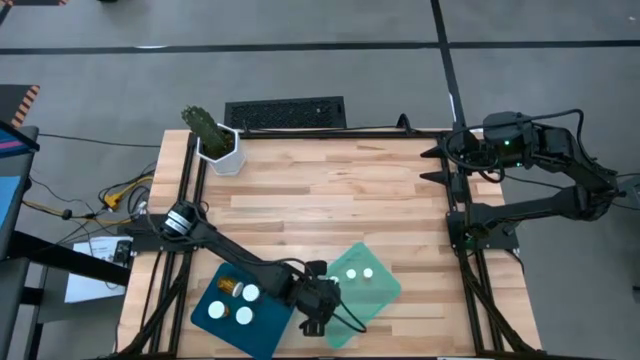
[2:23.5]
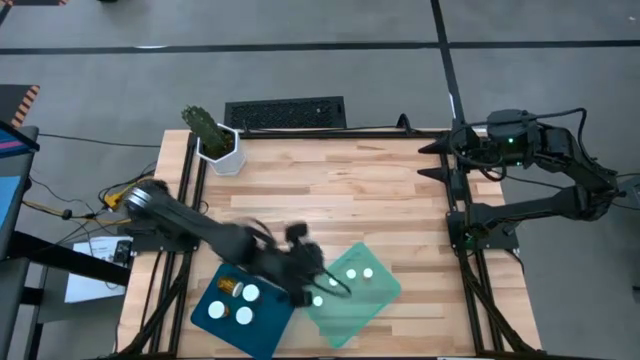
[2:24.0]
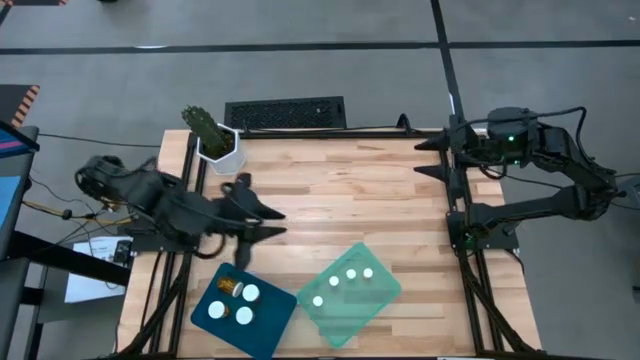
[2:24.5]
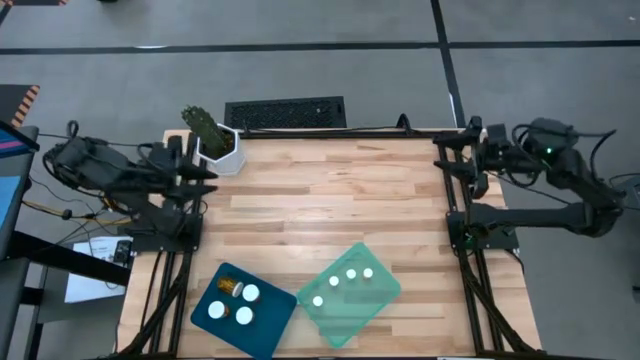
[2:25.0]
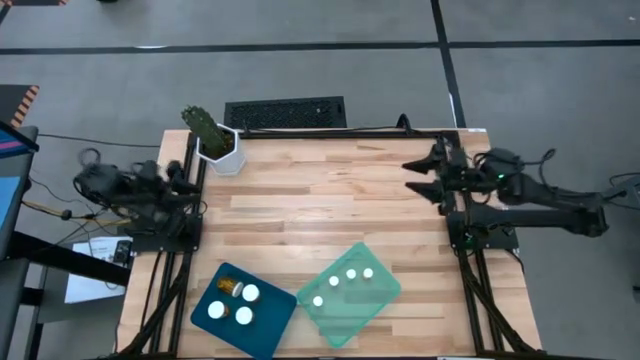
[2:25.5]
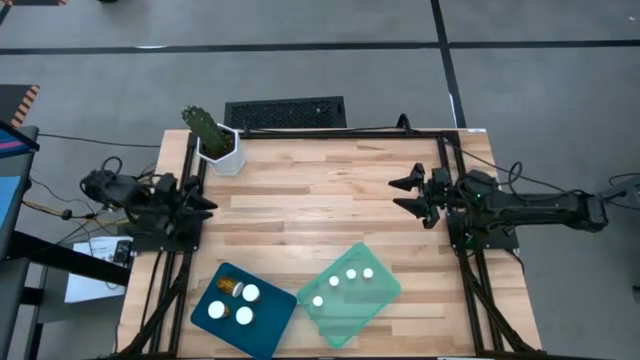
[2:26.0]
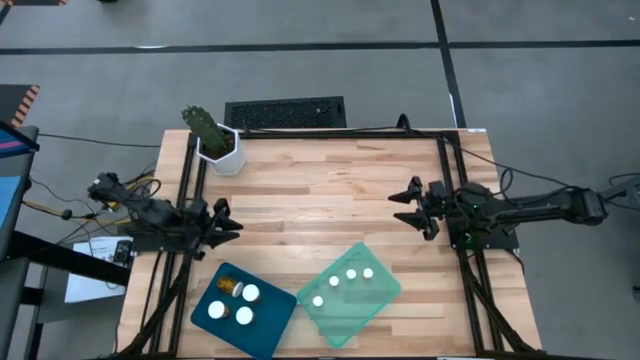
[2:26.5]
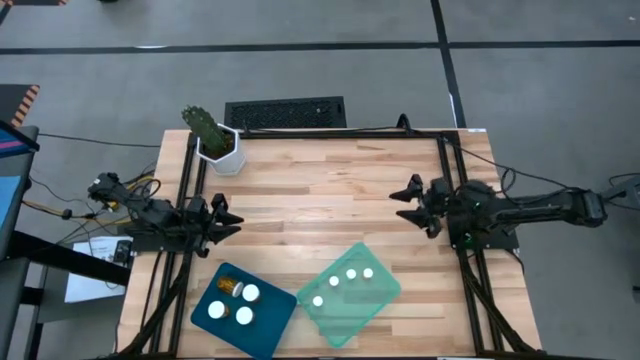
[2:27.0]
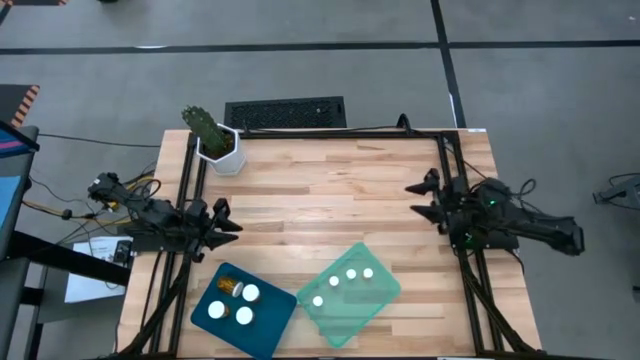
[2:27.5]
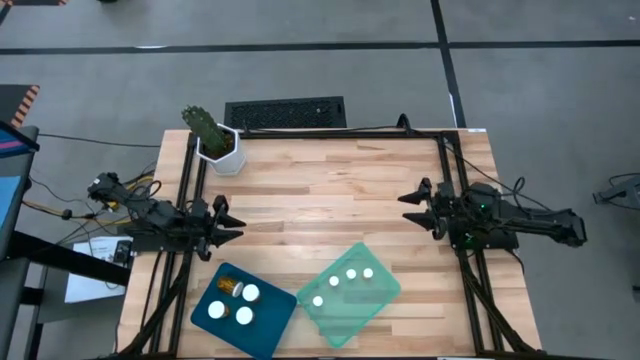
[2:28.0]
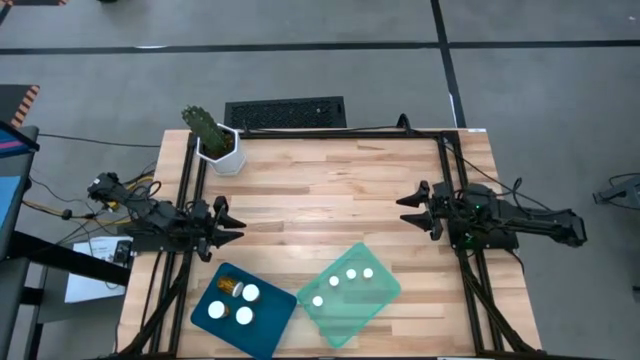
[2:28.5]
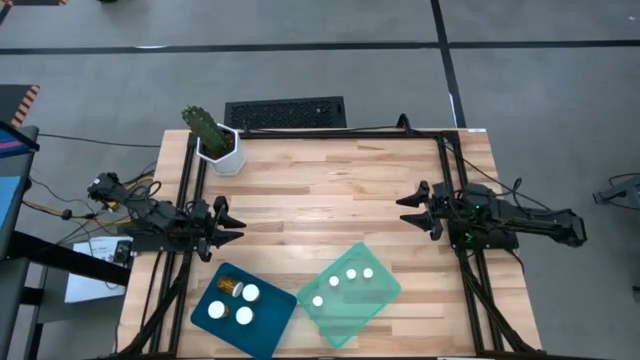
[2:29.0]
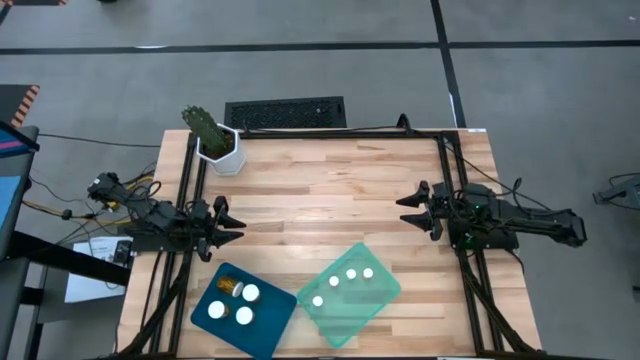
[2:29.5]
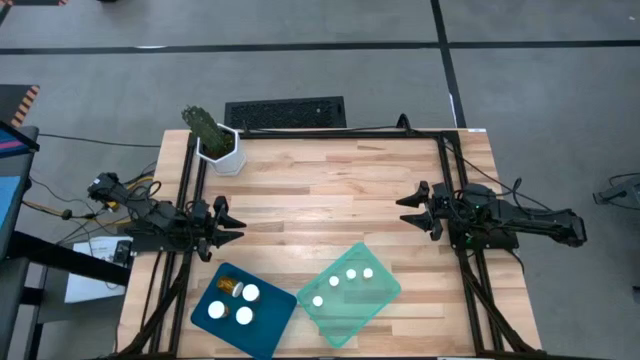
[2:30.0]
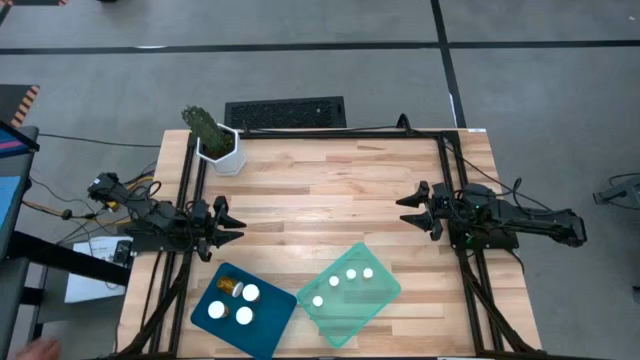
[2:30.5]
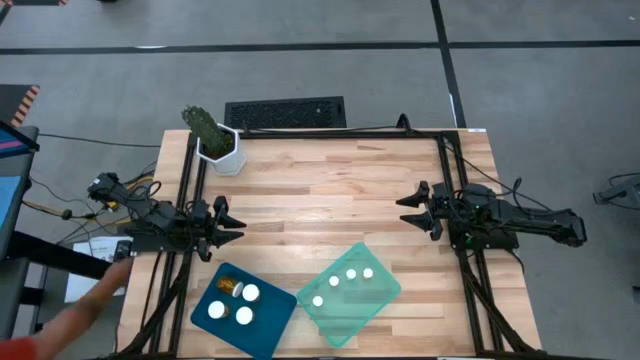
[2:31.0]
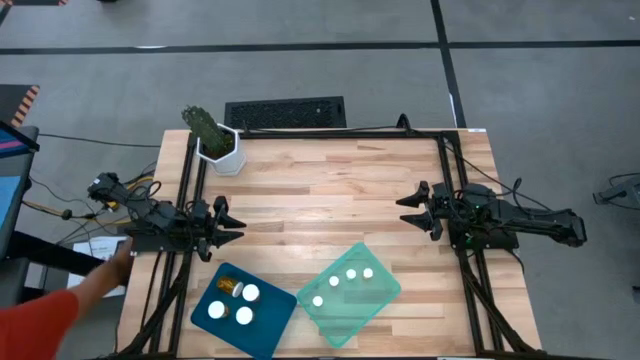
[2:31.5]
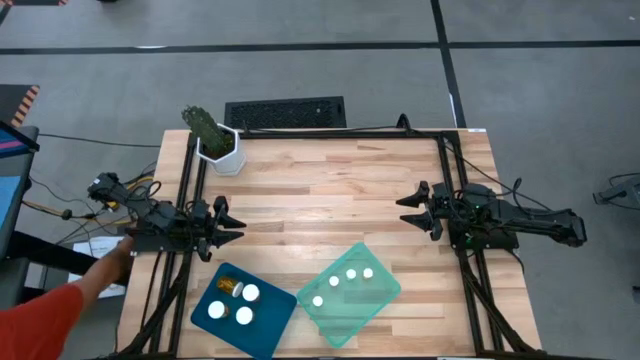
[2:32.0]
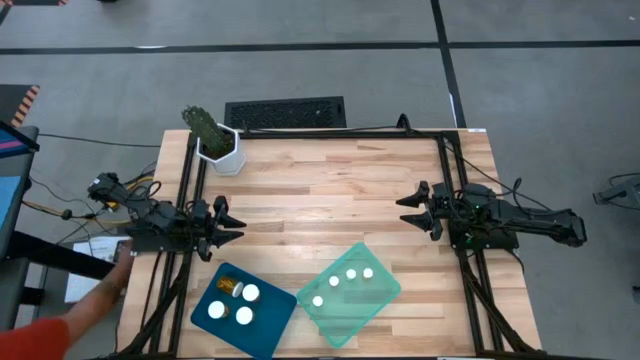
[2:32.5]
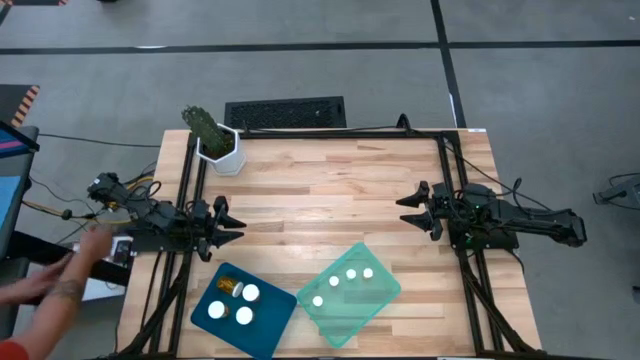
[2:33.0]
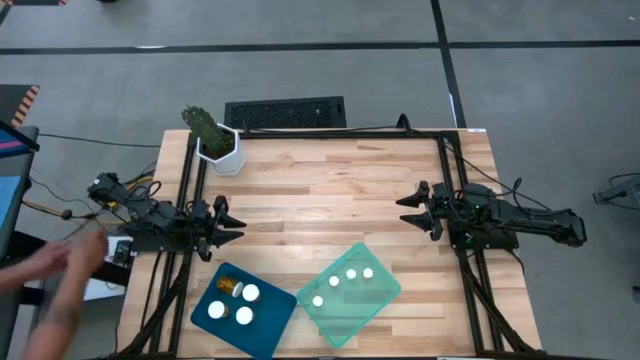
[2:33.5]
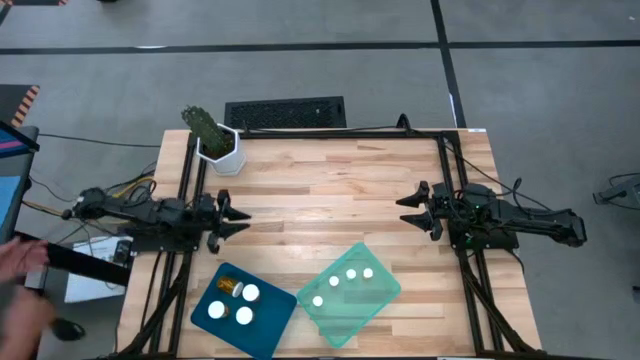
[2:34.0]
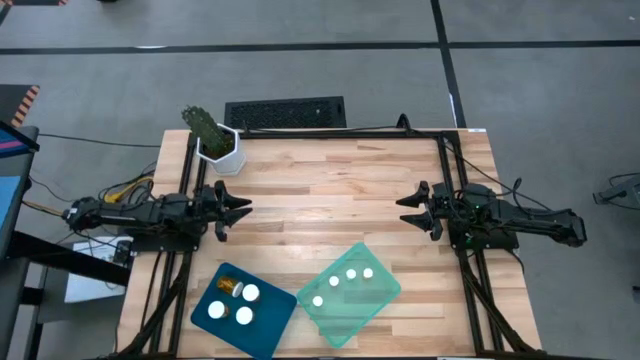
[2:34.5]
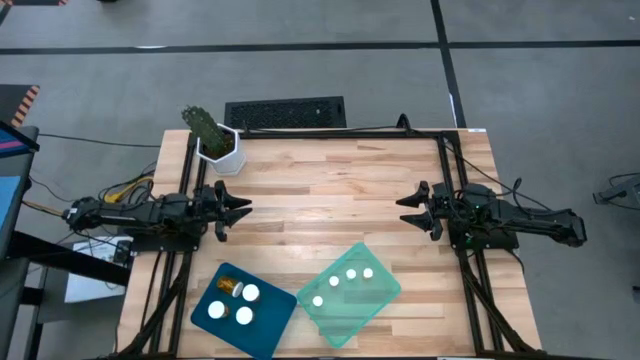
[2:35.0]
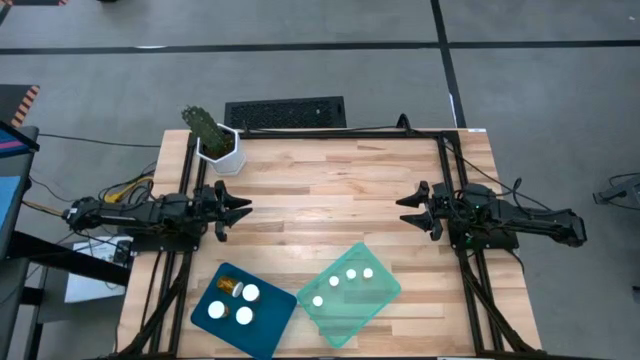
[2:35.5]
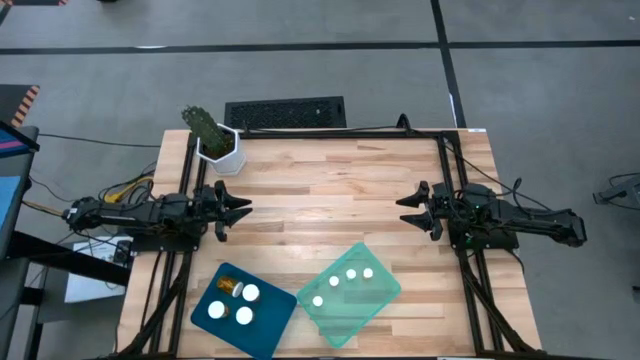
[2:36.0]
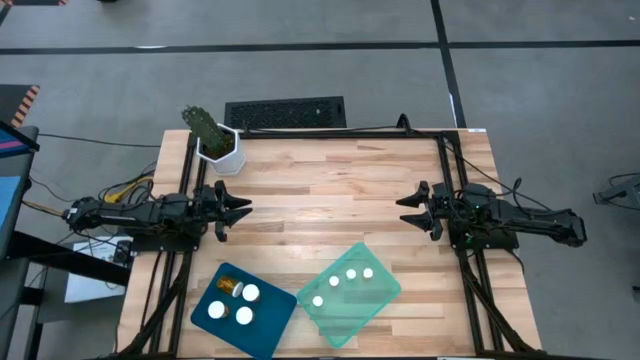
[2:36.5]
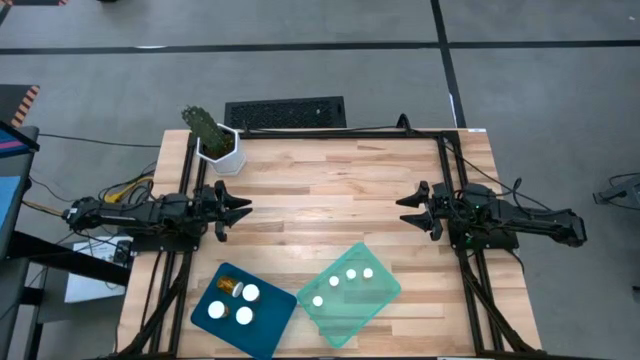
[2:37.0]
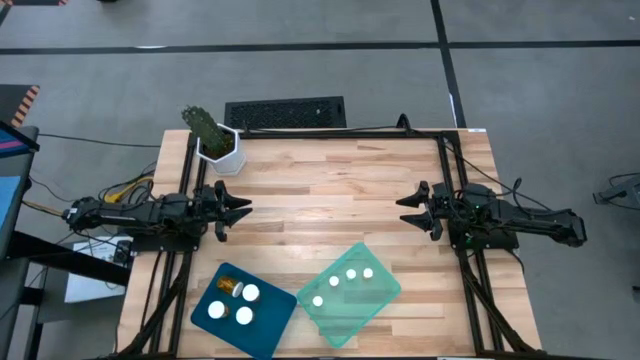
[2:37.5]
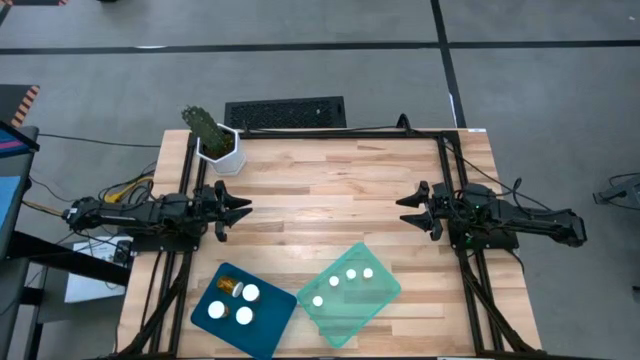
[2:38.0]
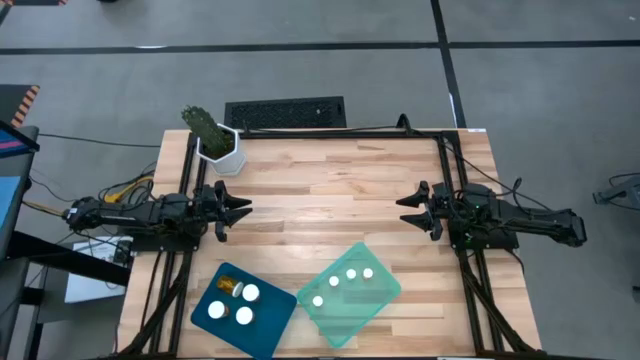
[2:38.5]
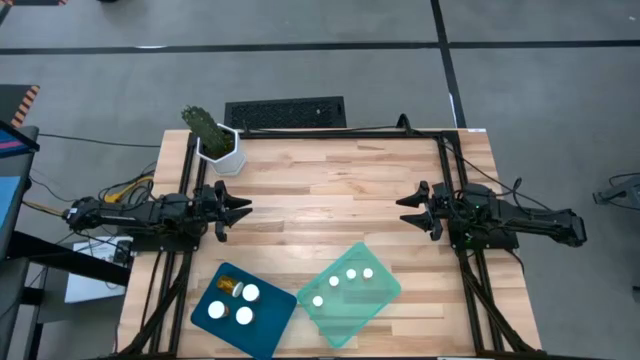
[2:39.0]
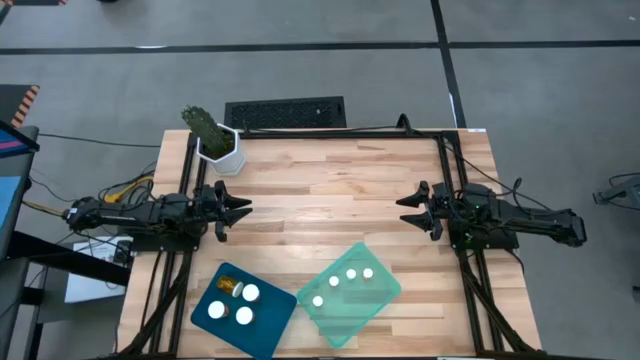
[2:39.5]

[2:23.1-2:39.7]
Task: Pick and place medicine bottles into bin by pill shape (circle, oval)
Return to Home Position

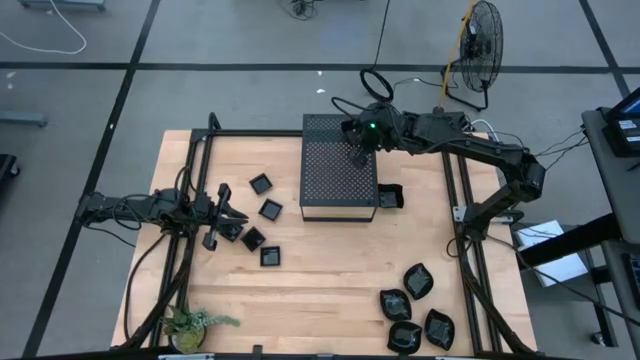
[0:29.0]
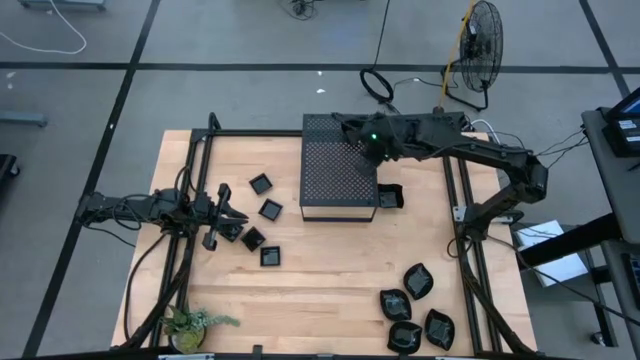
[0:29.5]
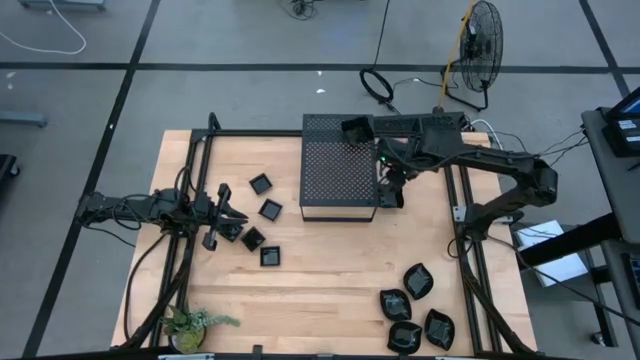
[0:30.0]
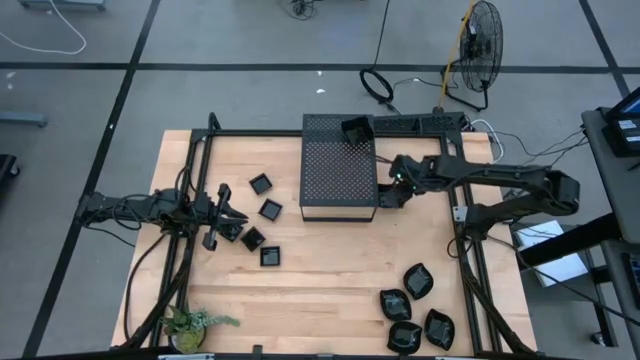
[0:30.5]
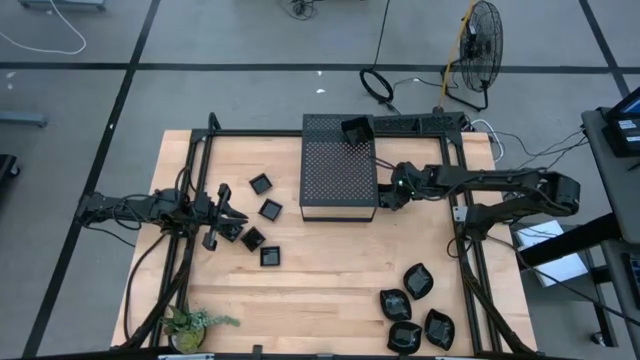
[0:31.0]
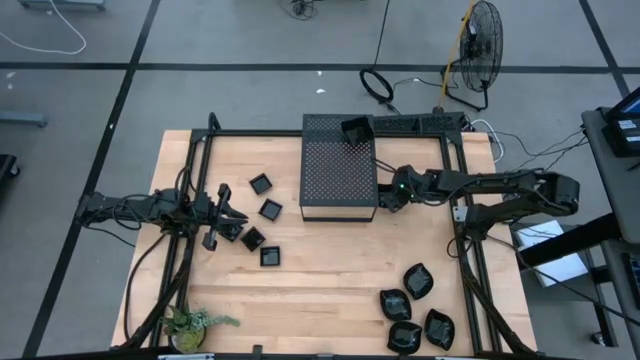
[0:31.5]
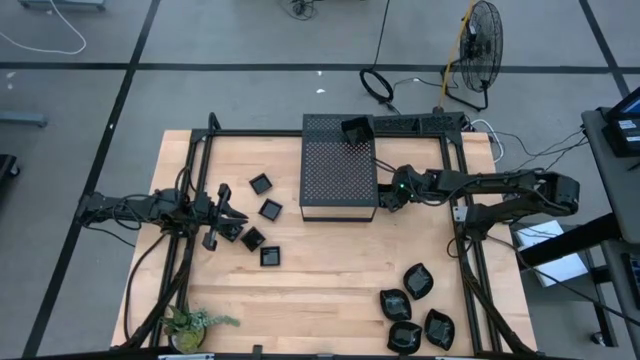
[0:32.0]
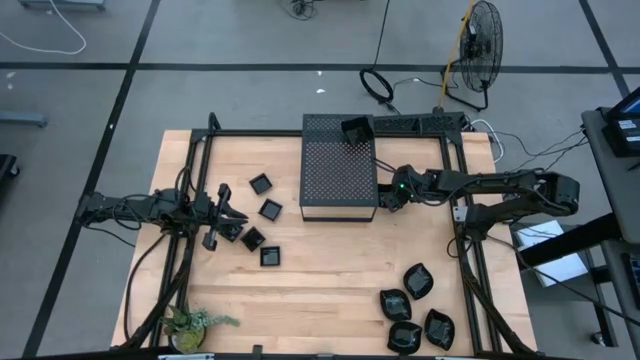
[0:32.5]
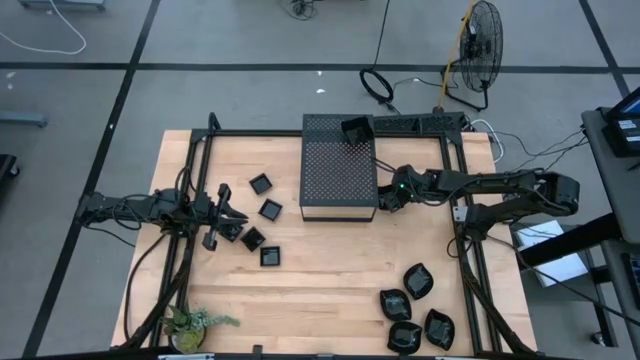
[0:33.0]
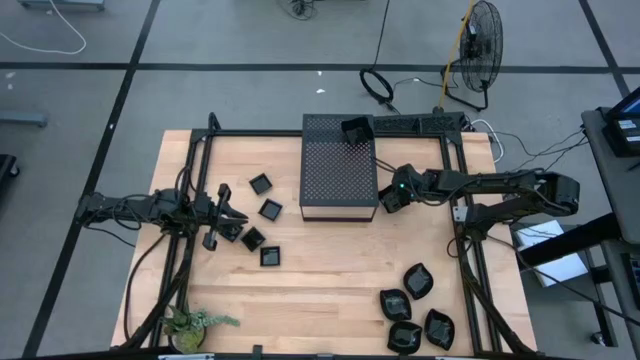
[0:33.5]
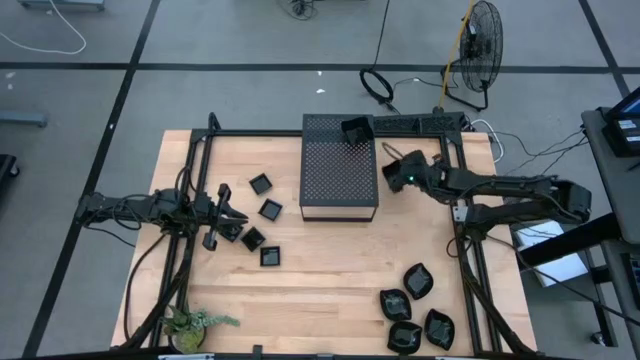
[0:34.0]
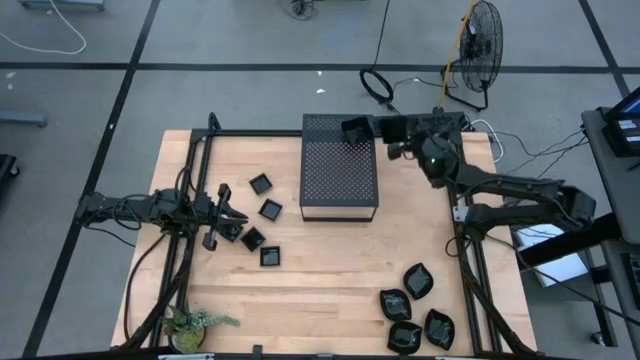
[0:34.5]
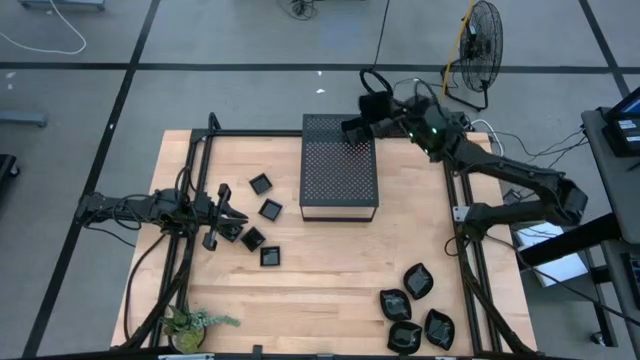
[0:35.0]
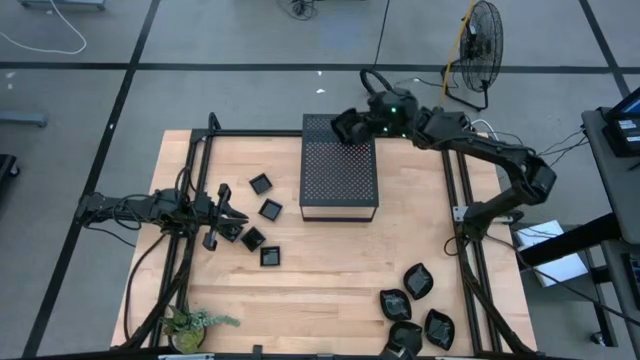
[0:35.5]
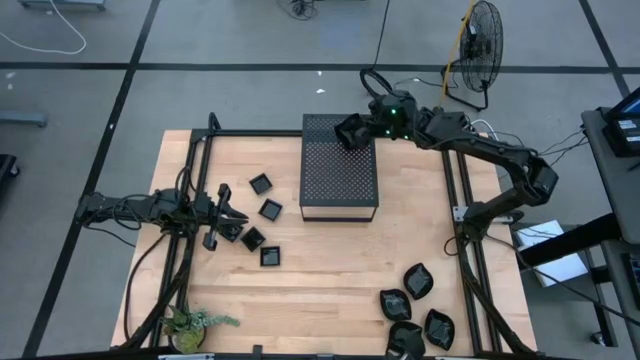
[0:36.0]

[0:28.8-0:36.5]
Task: Pick & Place Mini shaped plates
Stack the distorted square plate on top of the distorted square plate on the shelf
